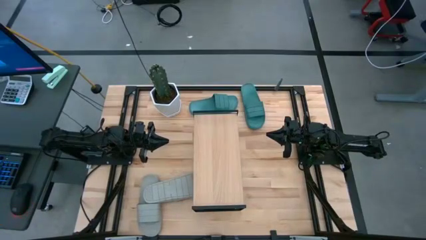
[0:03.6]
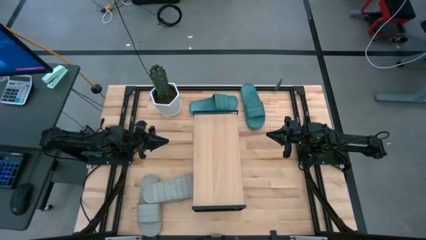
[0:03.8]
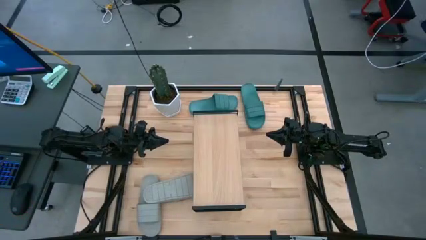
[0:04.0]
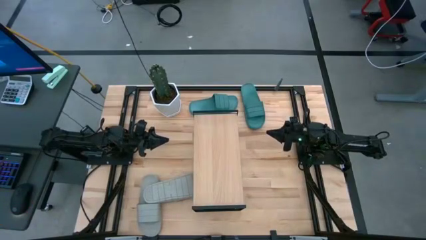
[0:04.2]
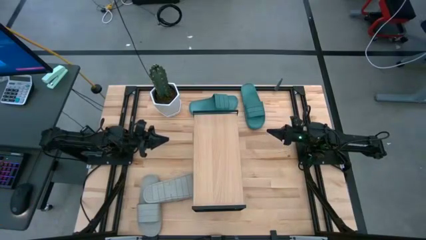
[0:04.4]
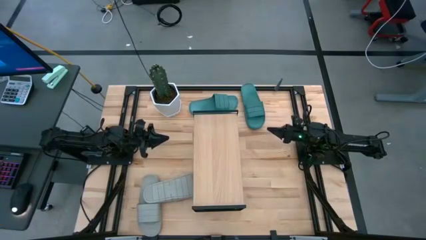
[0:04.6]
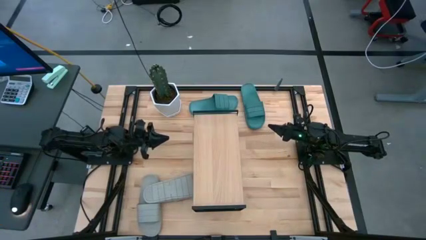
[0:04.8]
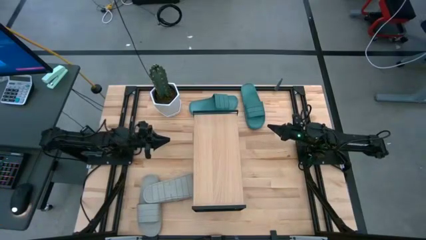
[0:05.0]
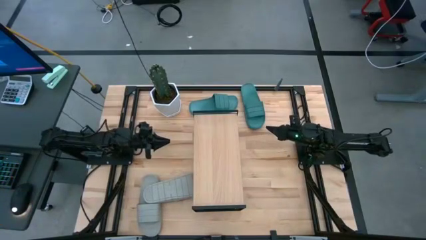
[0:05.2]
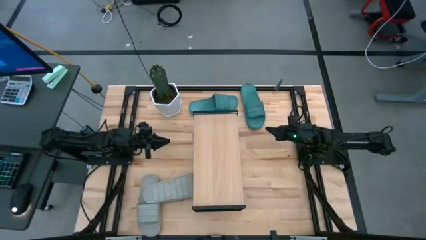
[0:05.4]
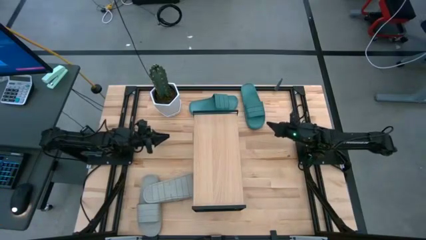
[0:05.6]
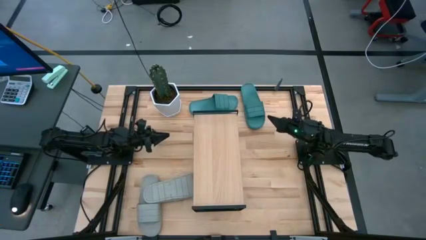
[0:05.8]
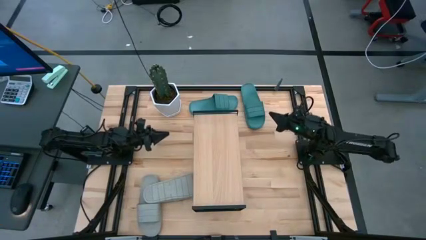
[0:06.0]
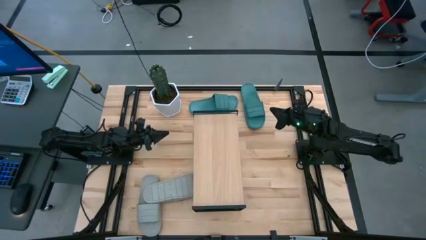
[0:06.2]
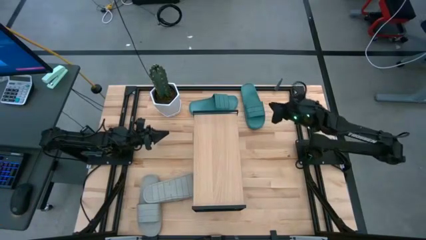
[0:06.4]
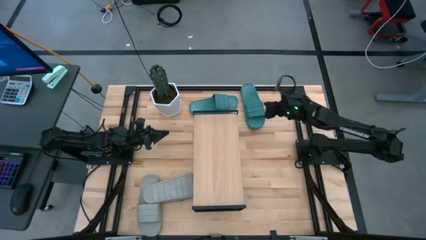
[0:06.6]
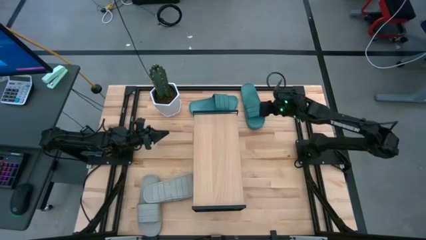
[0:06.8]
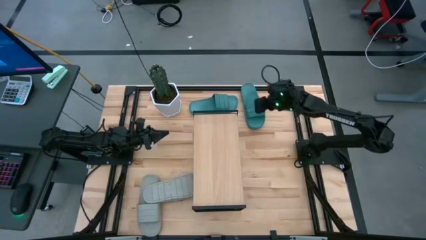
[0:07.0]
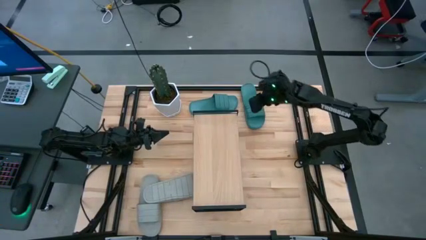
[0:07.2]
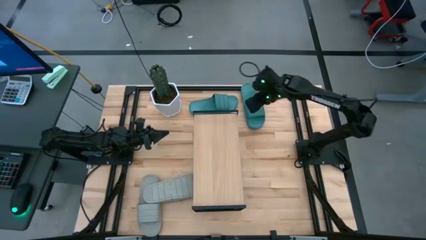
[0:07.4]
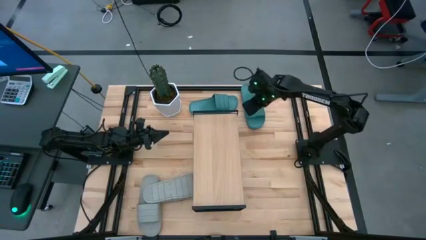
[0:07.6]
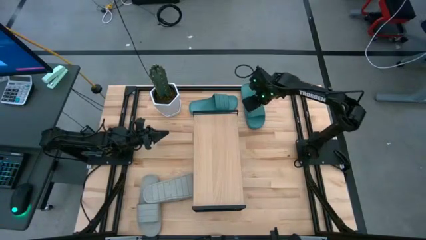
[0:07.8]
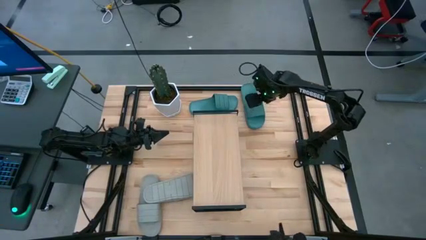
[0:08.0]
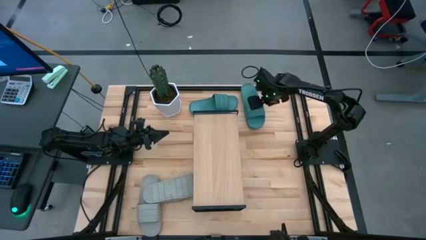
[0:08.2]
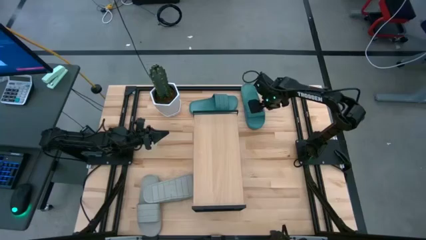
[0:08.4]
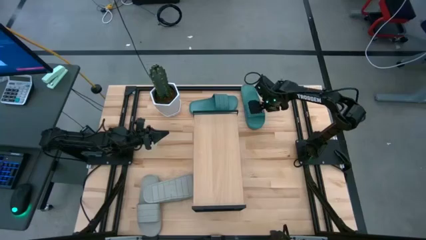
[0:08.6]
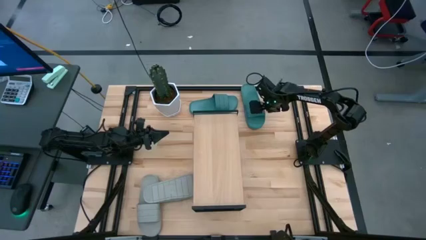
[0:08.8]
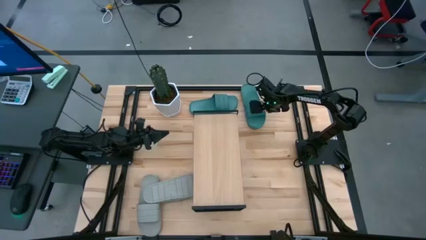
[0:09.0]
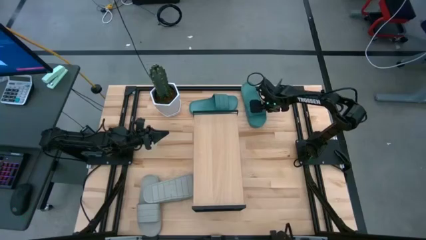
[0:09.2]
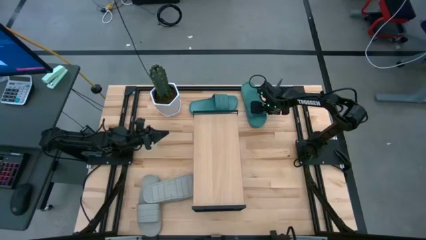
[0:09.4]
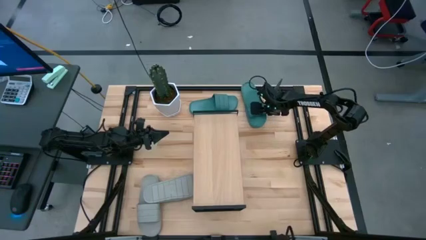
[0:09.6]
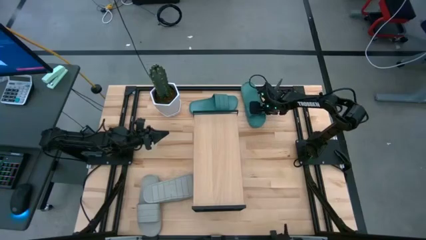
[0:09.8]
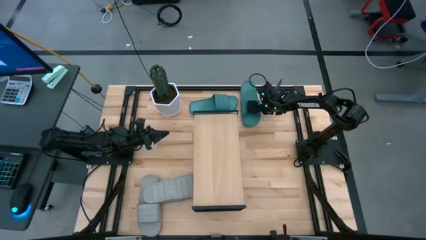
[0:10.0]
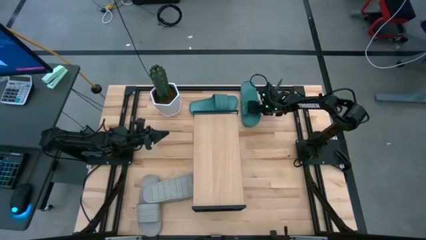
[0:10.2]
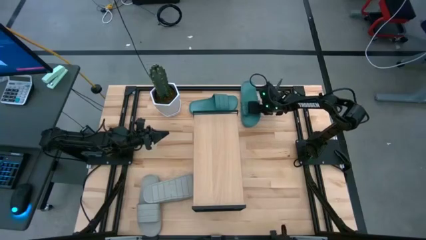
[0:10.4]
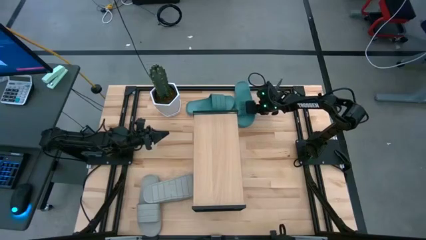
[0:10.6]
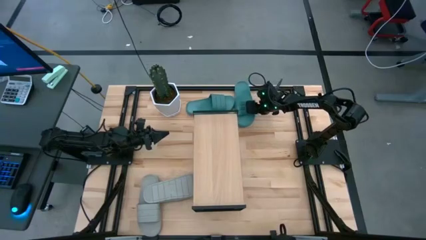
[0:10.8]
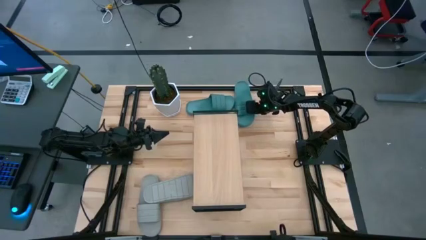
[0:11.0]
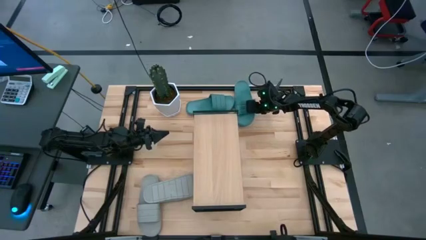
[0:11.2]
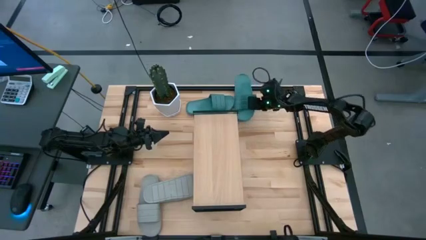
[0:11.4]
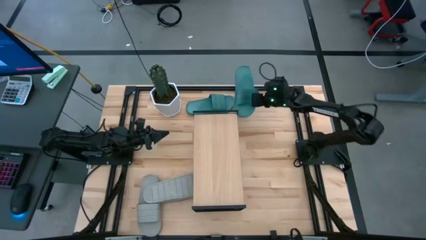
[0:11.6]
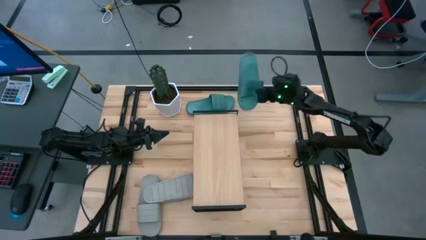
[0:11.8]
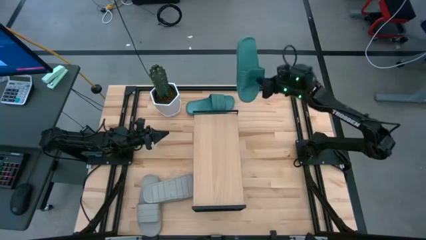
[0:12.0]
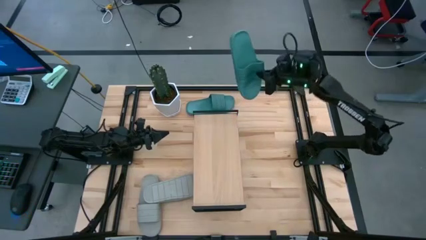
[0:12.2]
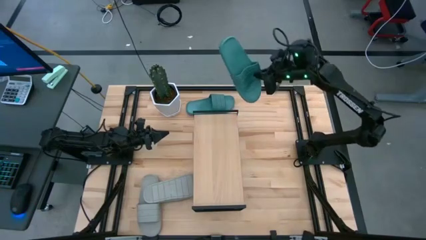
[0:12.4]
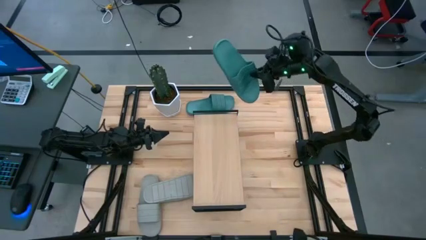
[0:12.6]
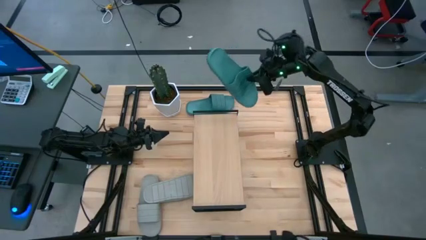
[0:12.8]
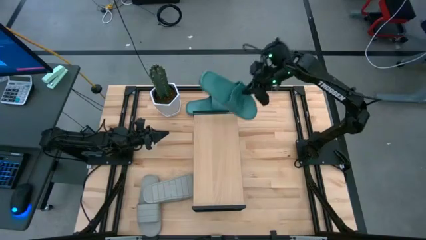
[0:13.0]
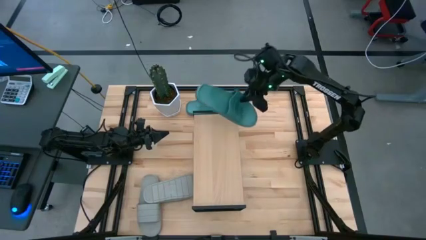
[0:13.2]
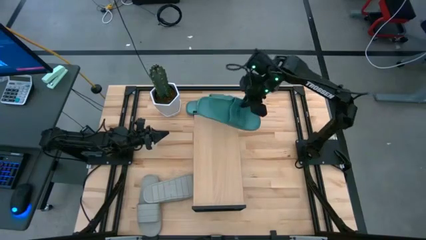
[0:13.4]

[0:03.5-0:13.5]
Task: Pick and place slides into the shelf
Put the right green slide on the shelf
